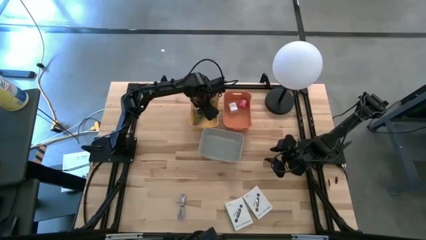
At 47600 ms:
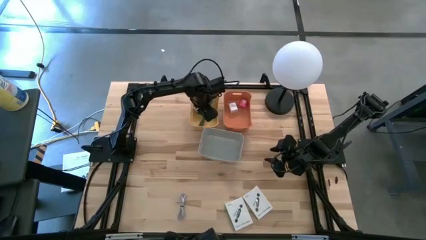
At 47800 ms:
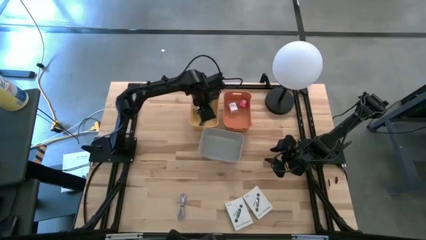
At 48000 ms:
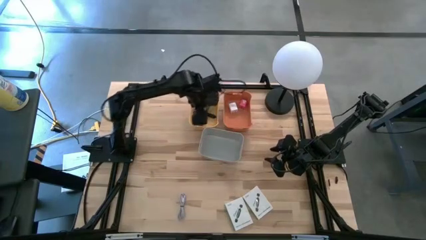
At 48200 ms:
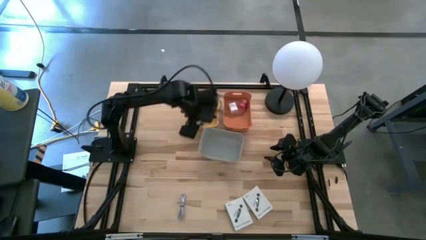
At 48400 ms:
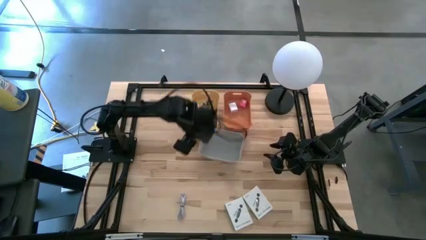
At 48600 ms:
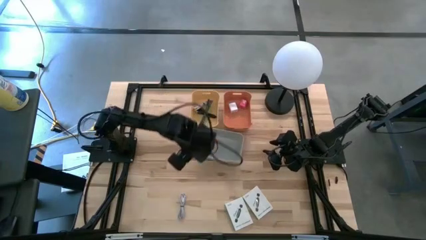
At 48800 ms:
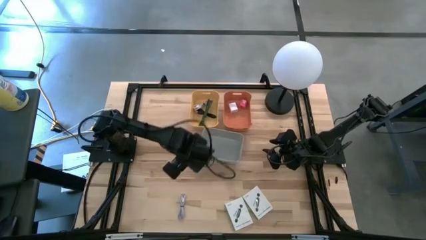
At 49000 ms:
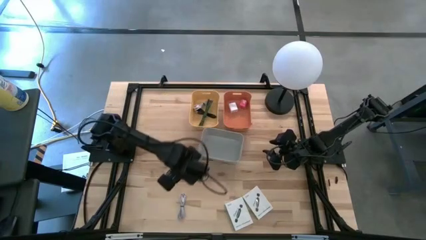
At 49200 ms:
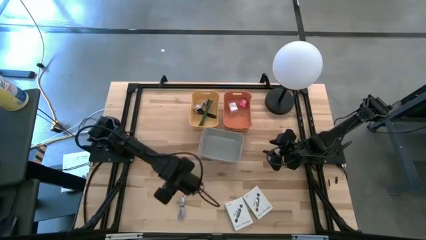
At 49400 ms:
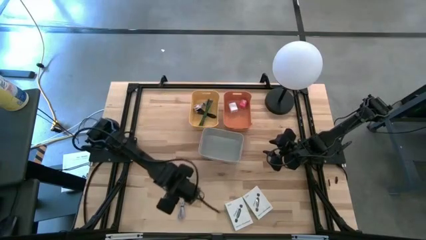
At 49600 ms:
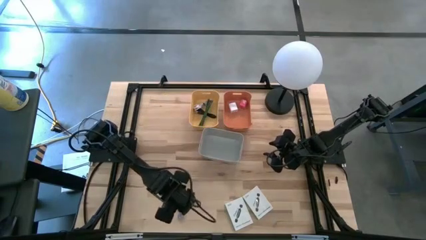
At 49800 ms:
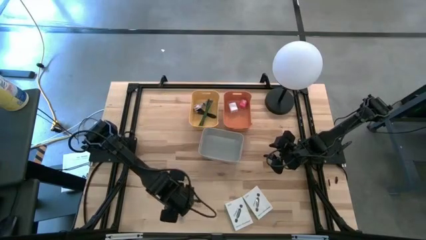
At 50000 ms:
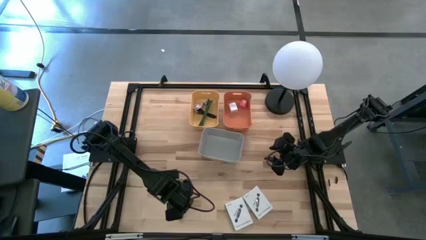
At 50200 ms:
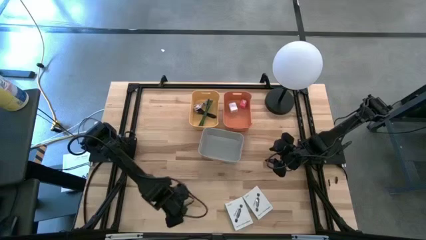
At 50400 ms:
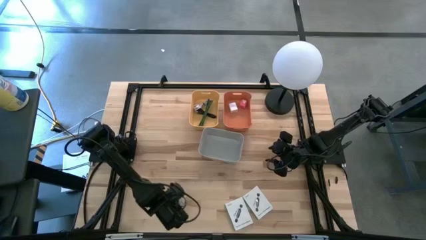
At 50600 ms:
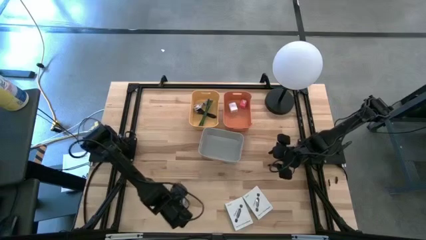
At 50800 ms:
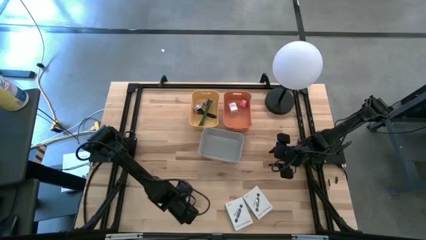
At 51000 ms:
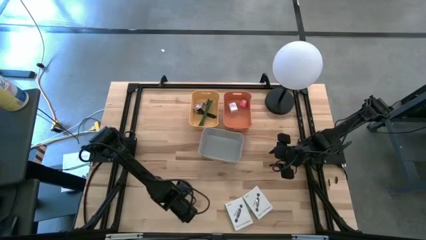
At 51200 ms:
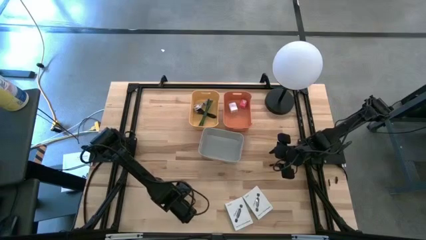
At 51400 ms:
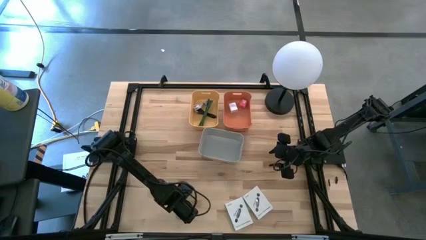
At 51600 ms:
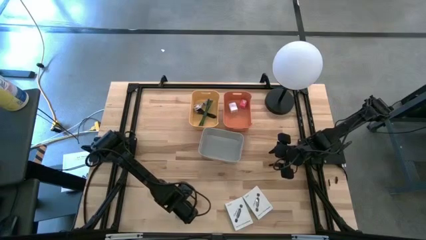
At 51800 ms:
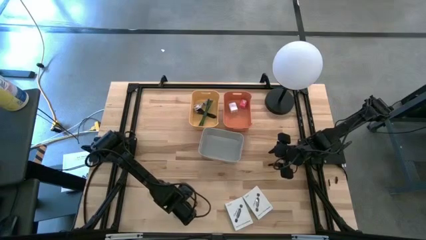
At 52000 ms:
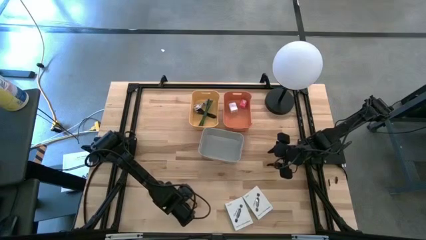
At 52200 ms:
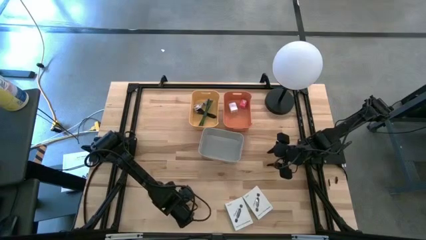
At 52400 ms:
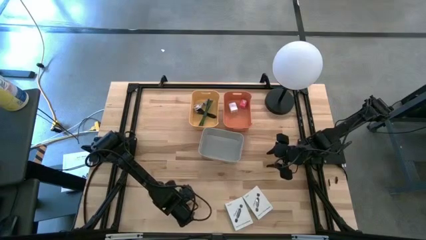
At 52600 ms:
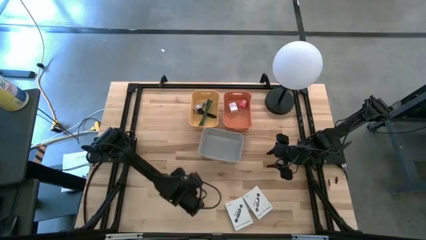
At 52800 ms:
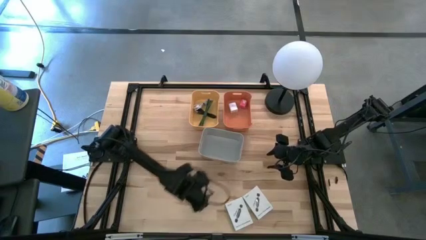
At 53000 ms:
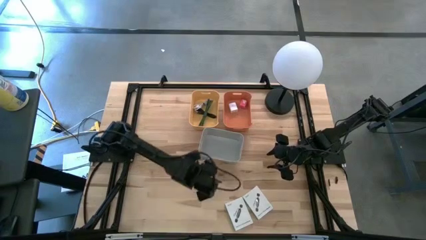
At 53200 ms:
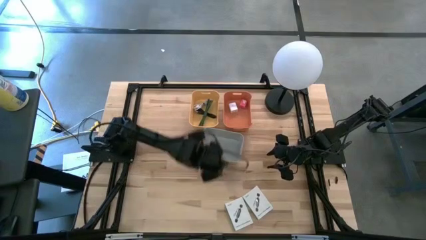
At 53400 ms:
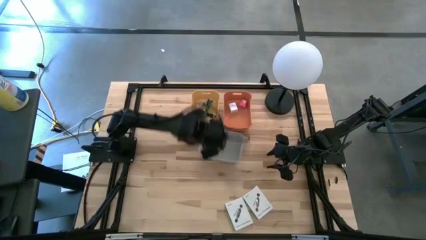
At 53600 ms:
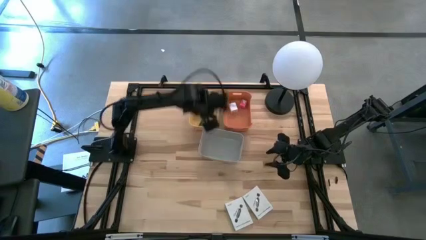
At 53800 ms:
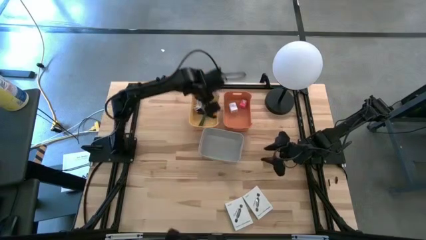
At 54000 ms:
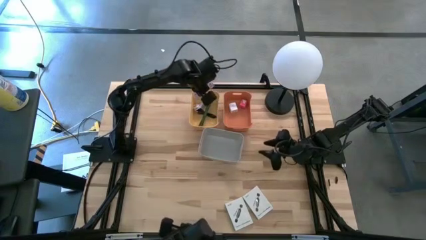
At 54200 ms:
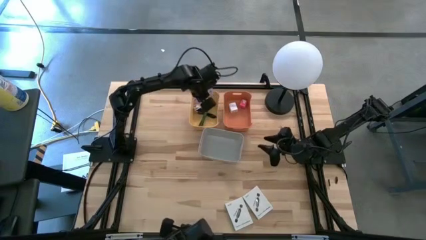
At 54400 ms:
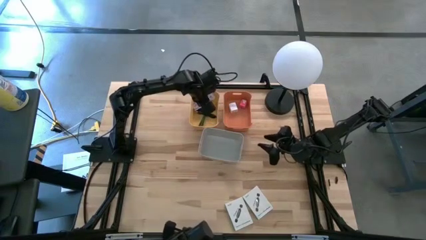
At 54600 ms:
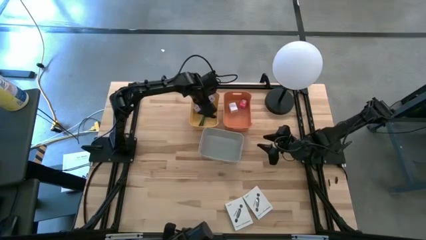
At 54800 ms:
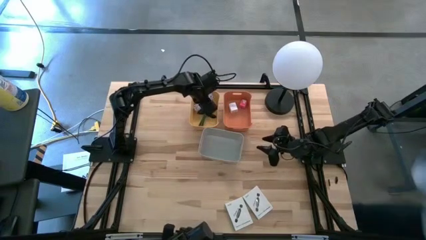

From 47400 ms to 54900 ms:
Task: Pick and place items into bin
Put the gray charger cable into the yellow bin

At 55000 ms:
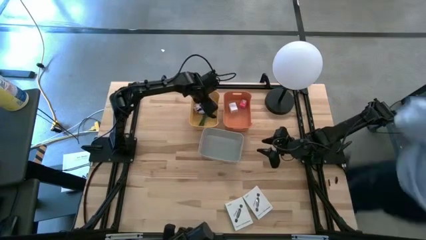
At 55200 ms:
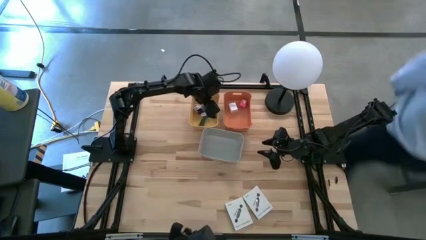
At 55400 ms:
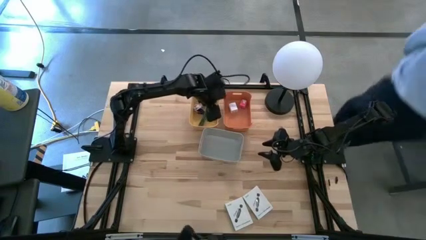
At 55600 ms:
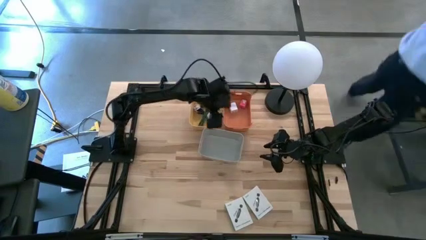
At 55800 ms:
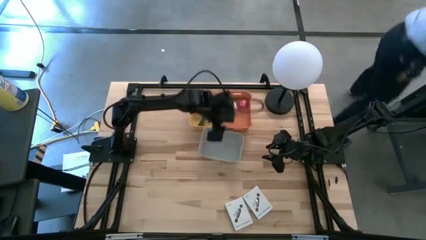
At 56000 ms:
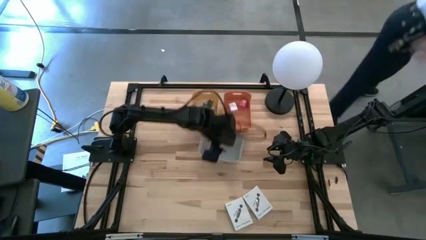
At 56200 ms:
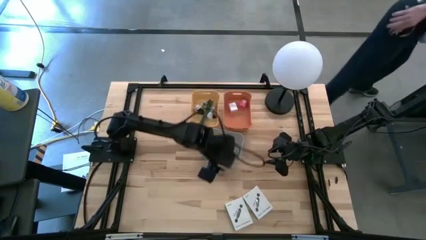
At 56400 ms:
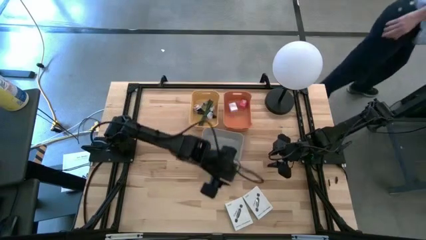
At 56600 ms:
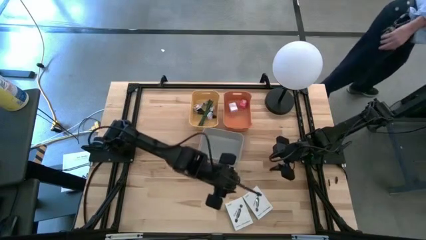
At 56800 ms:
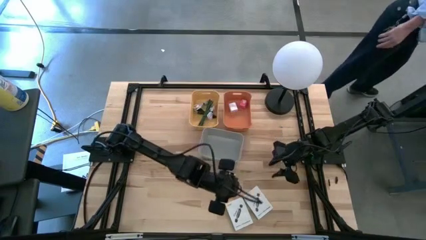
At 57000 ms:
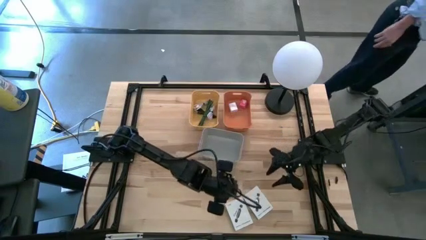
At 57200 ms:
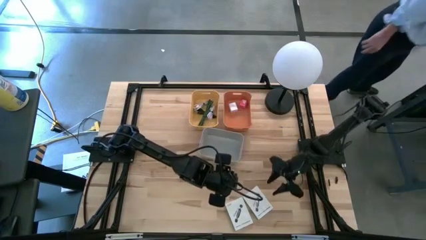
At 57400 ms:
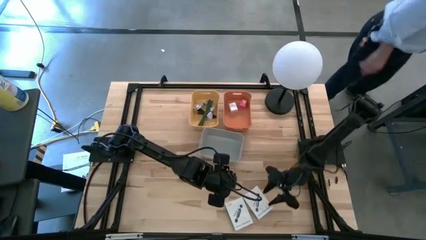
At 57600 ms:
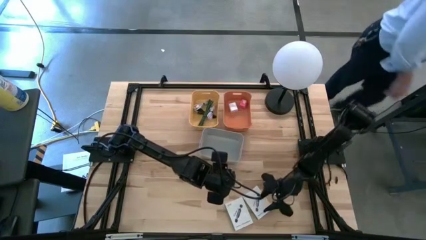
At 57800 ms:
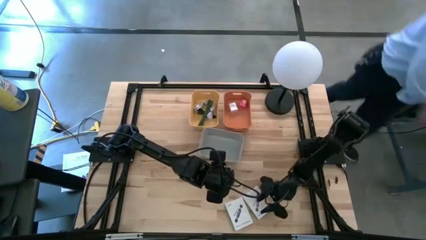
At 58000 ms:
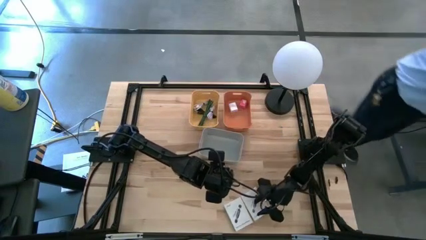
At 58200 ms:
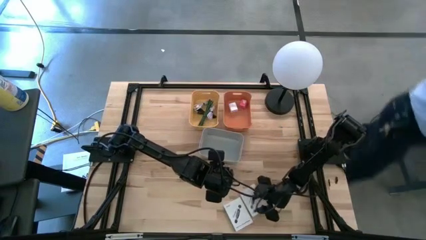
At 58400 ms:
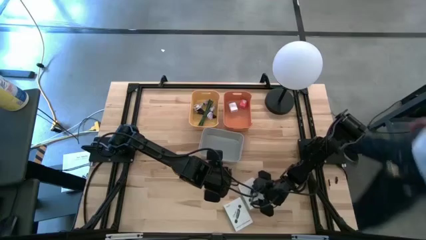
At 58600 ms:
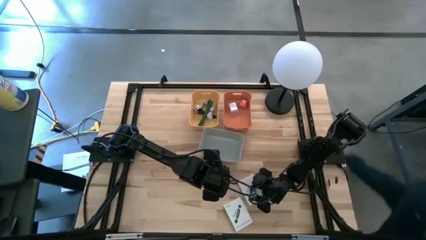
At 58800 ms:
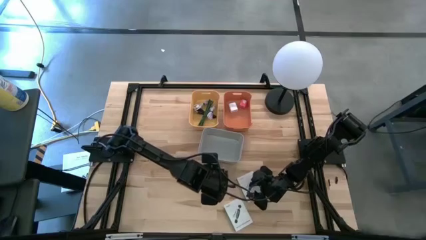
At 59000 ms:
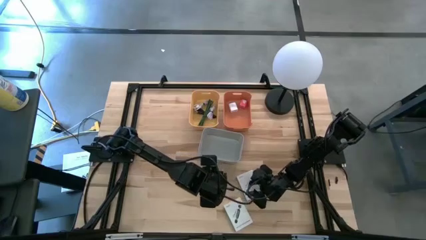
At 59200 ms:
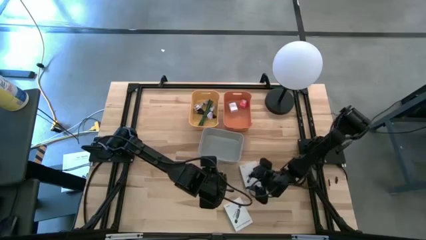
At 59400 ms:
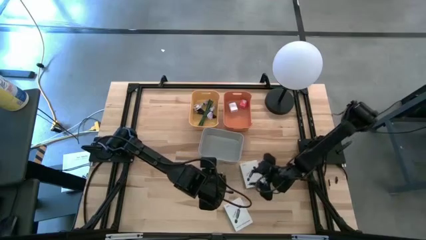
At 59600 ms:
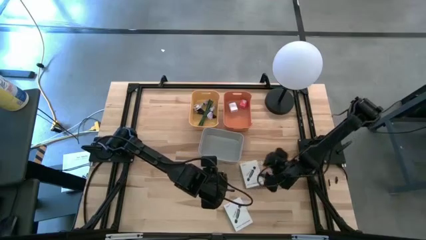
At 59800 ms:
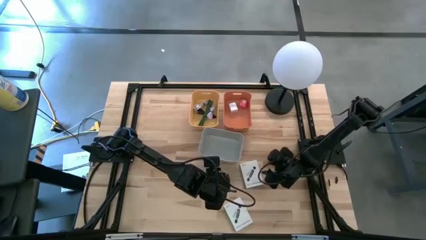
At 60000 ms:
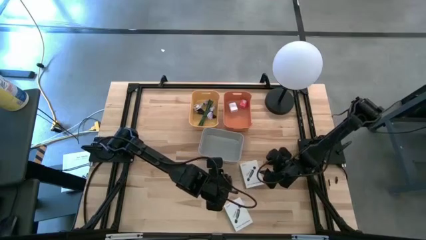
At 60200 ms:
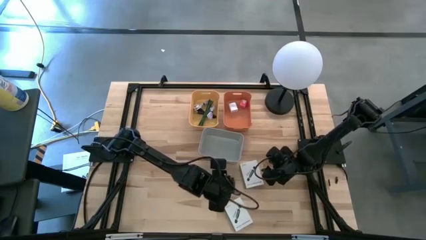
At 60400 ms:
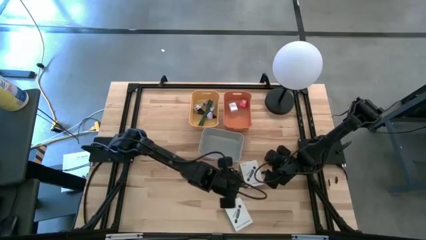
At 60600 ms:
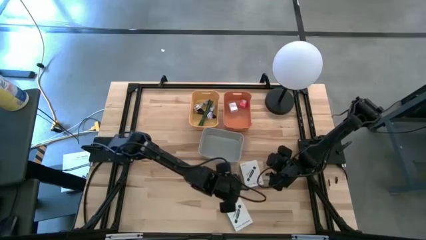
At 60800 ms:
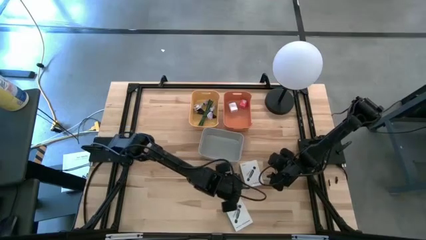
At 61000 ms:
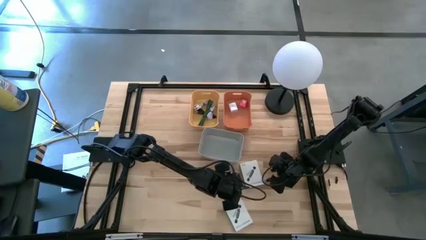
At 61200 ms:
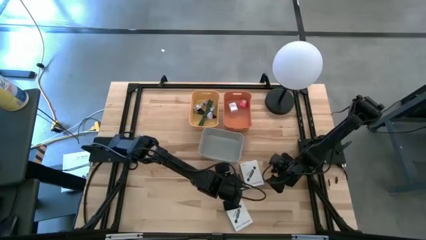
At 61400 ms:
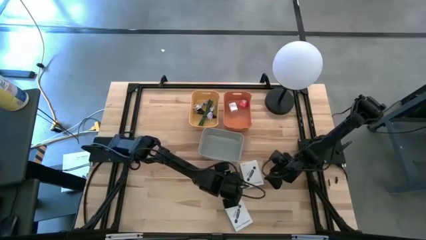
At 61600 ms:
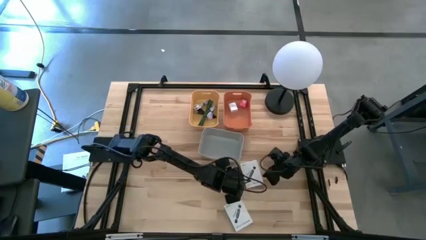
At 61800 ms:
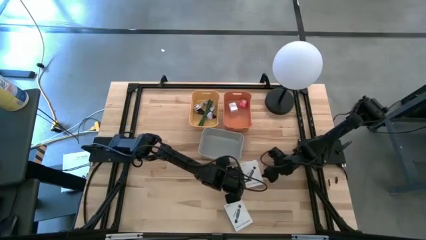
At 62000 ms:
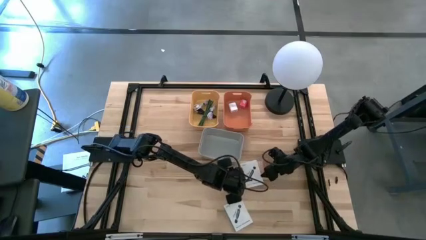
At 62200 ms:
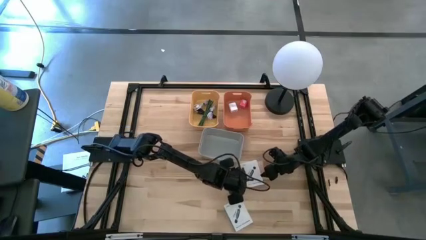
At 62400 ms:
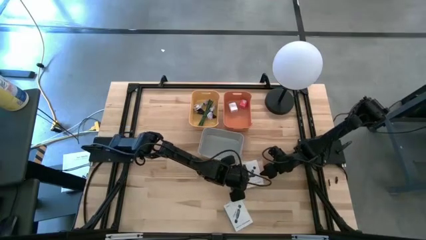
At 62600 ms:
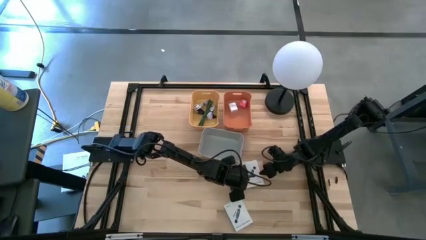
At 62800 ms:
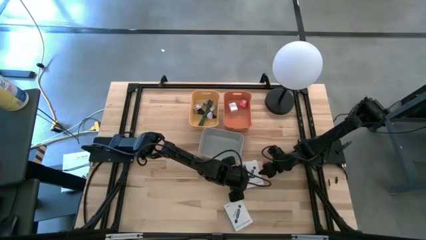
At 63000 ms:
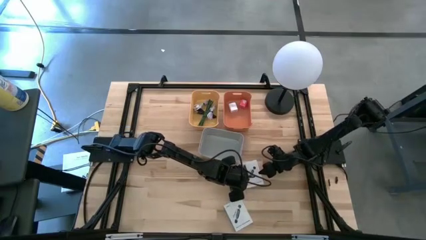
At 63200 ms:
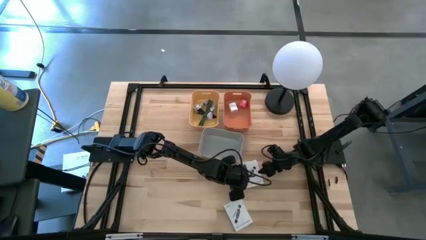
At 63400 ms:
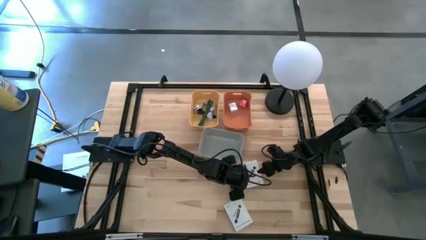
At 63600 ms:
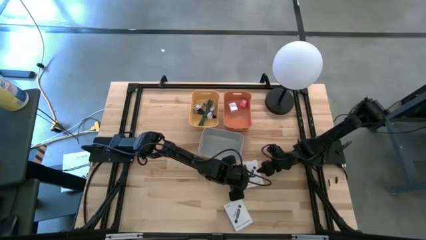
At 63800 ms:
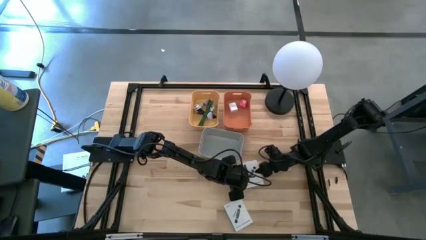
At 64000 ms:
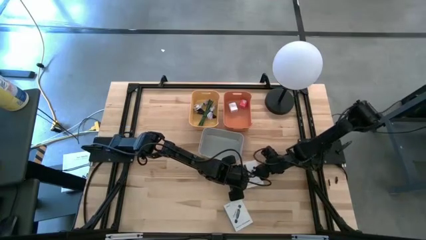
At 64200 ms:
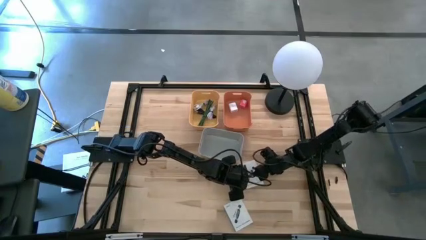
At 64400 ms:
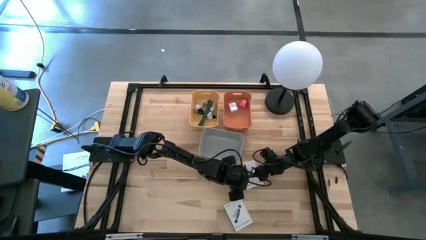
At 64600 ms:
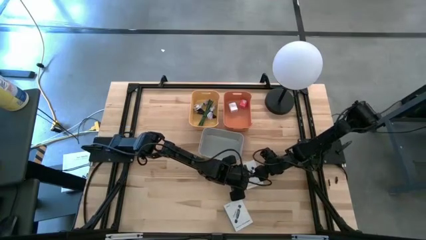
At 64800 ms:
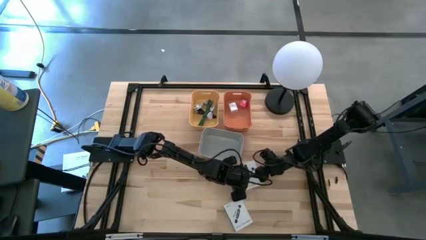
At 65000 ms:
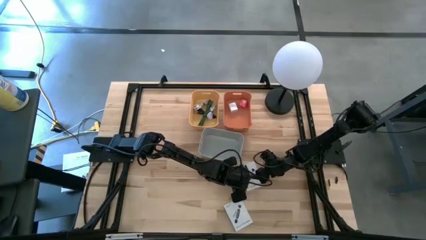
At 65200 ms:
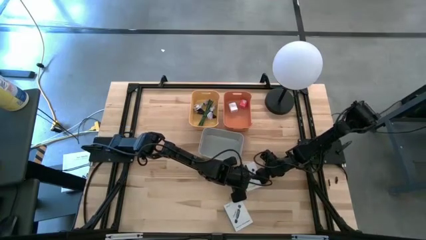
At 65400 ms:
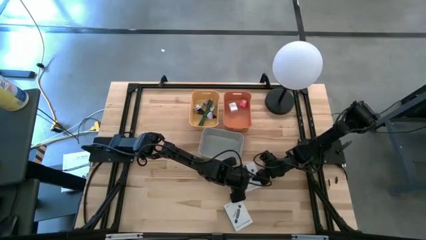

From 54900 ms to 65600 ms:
Put the right card reader box into the gray bin
